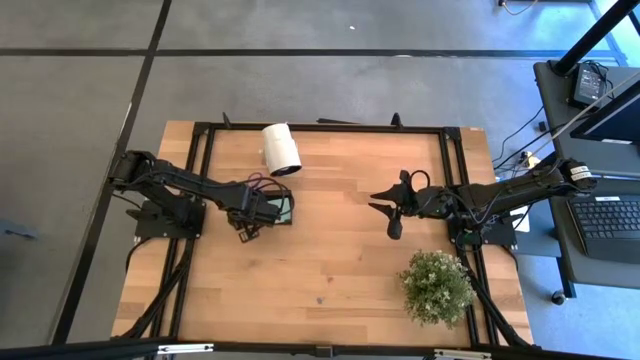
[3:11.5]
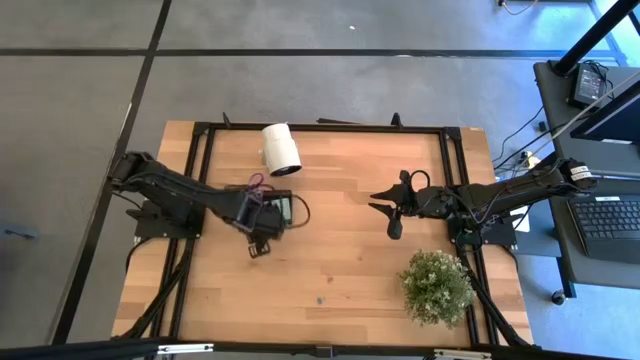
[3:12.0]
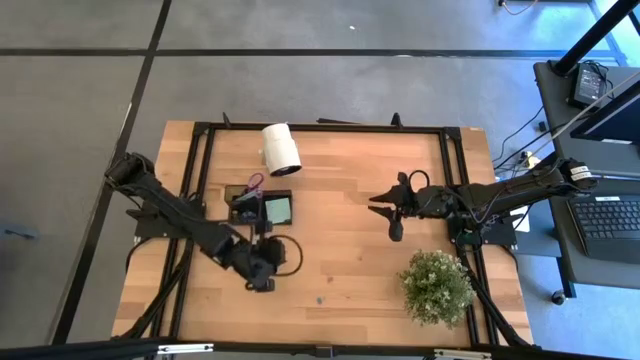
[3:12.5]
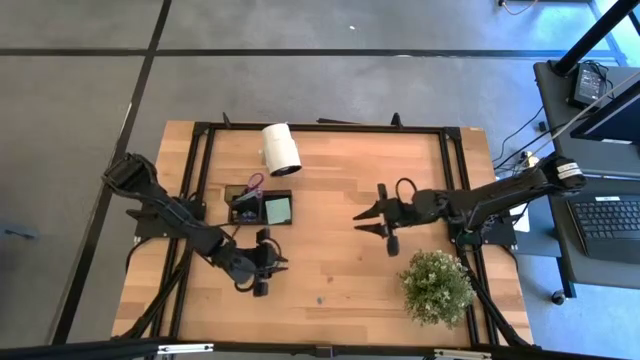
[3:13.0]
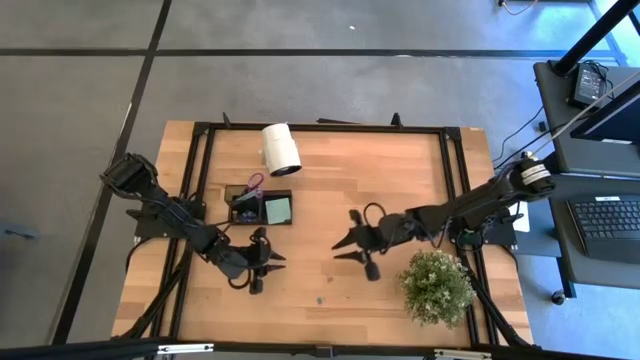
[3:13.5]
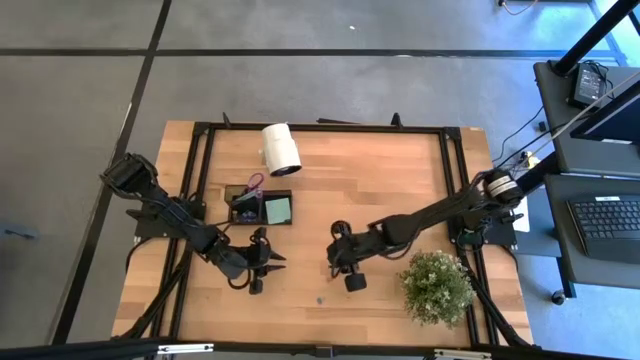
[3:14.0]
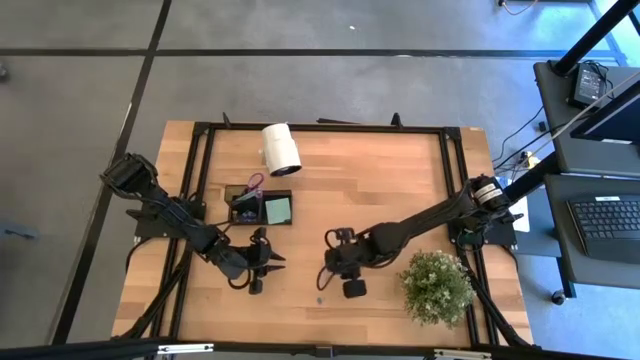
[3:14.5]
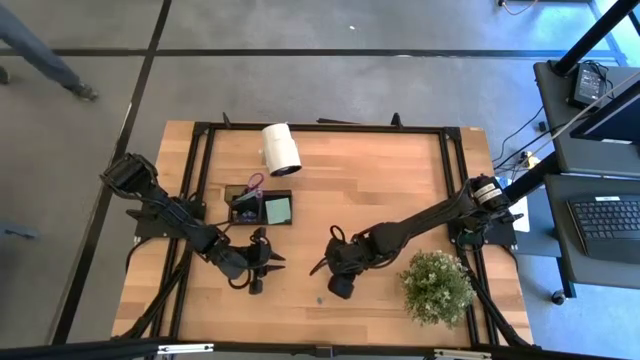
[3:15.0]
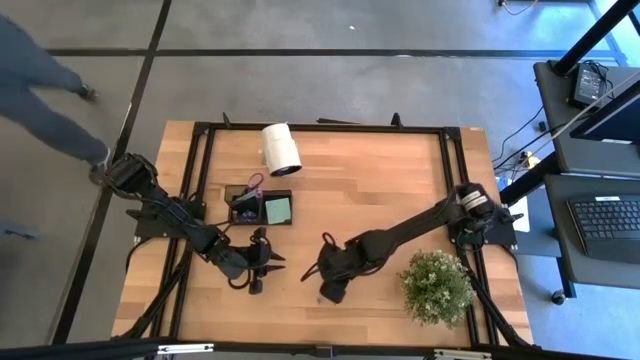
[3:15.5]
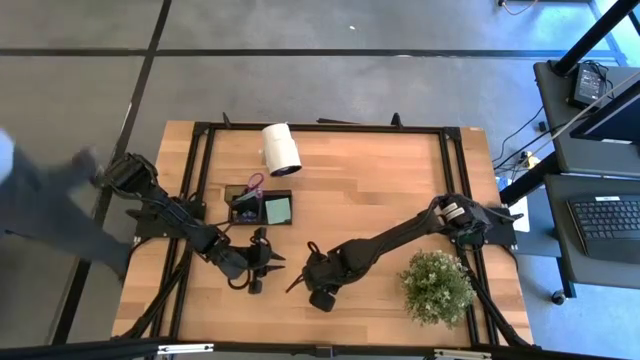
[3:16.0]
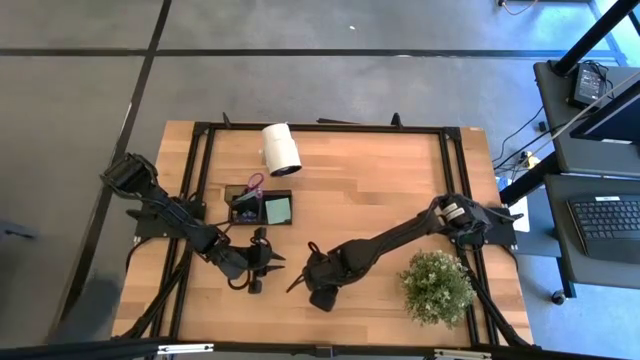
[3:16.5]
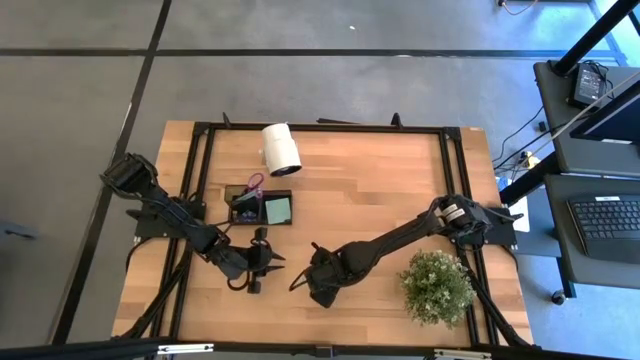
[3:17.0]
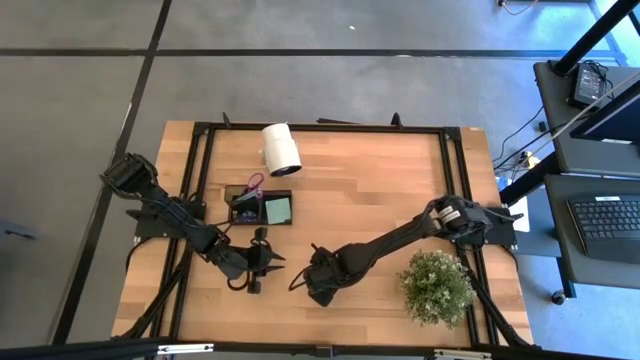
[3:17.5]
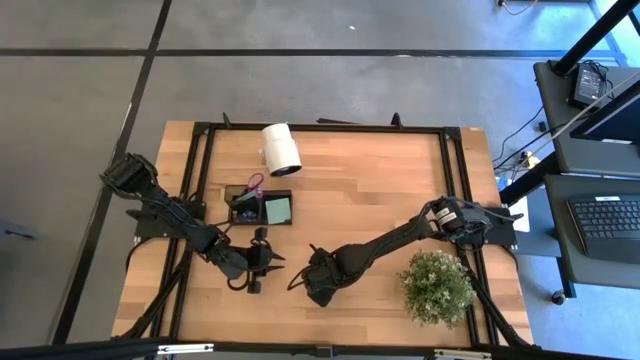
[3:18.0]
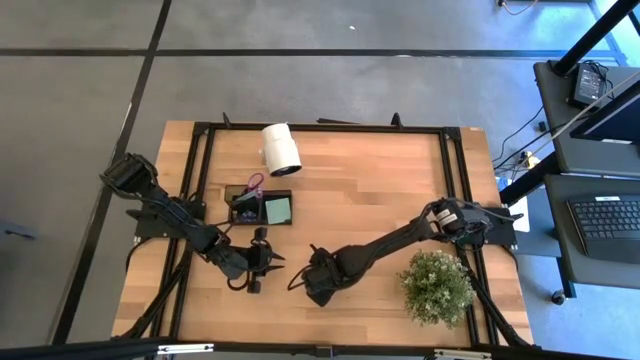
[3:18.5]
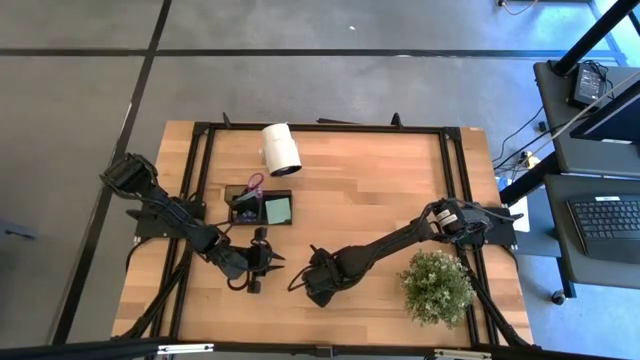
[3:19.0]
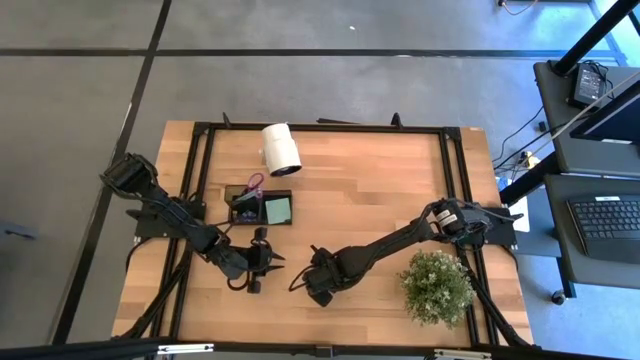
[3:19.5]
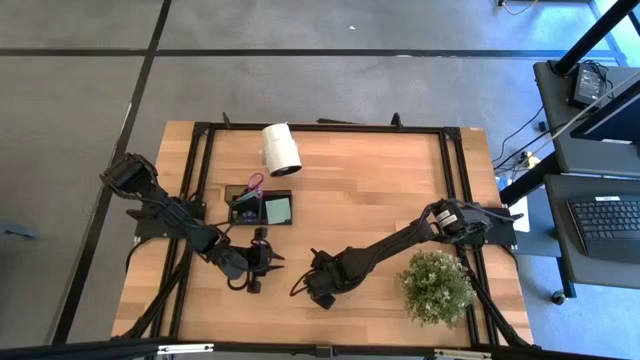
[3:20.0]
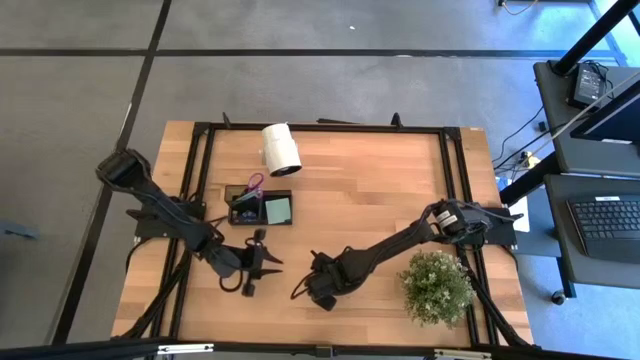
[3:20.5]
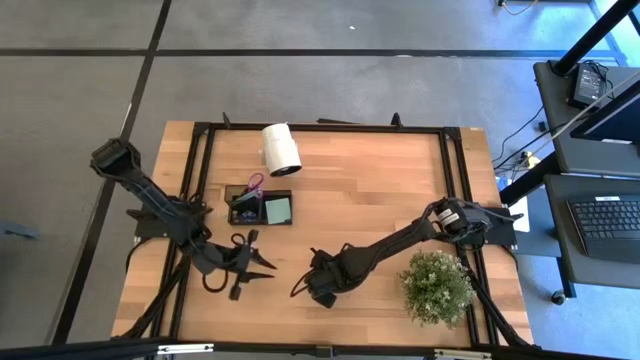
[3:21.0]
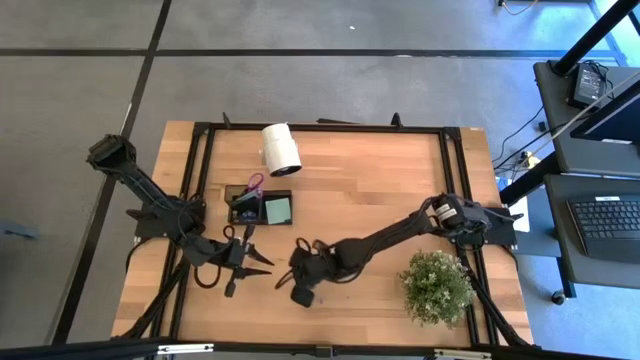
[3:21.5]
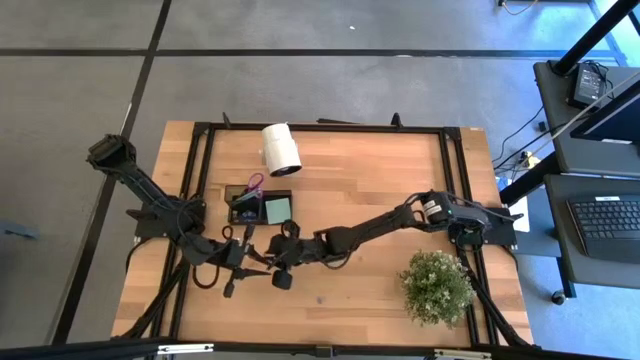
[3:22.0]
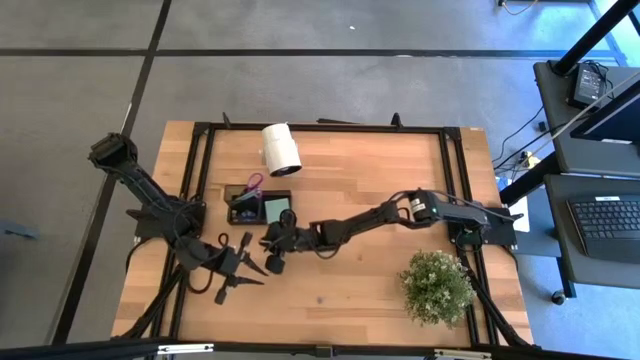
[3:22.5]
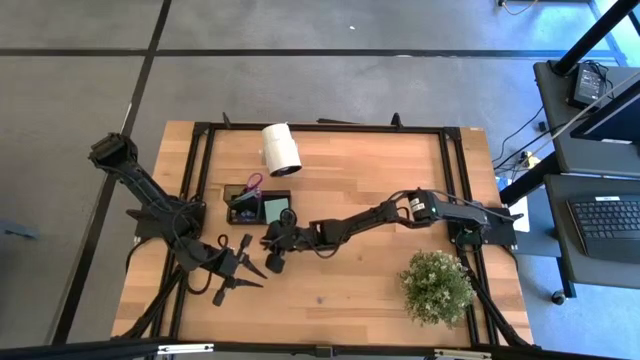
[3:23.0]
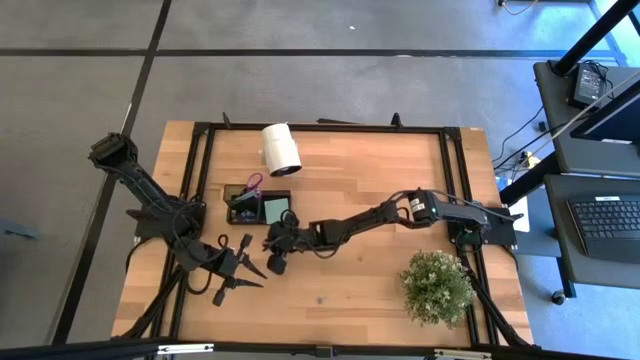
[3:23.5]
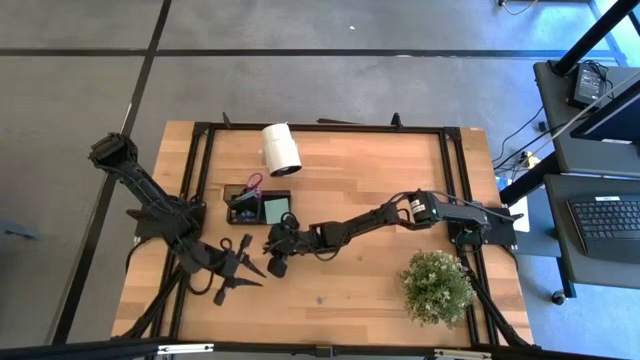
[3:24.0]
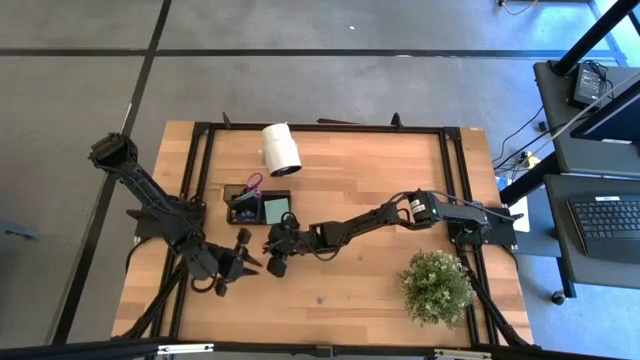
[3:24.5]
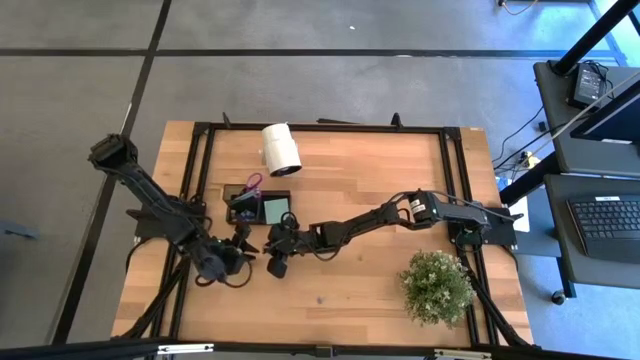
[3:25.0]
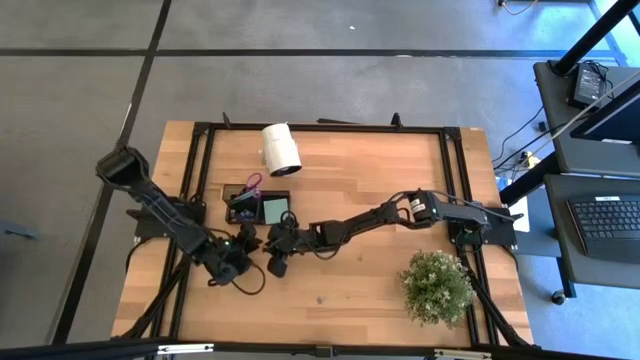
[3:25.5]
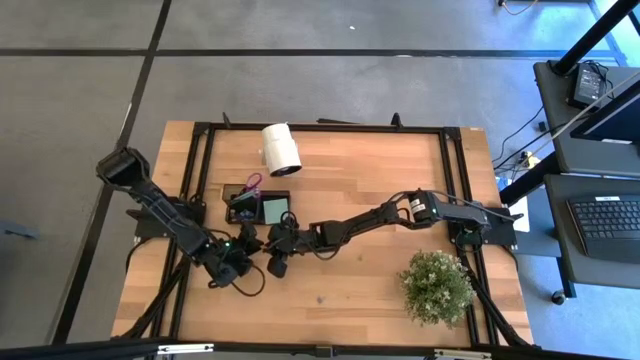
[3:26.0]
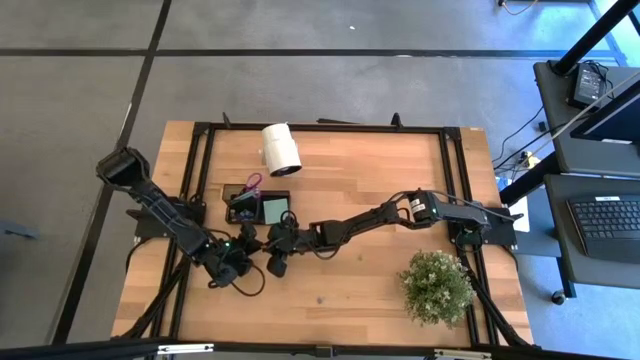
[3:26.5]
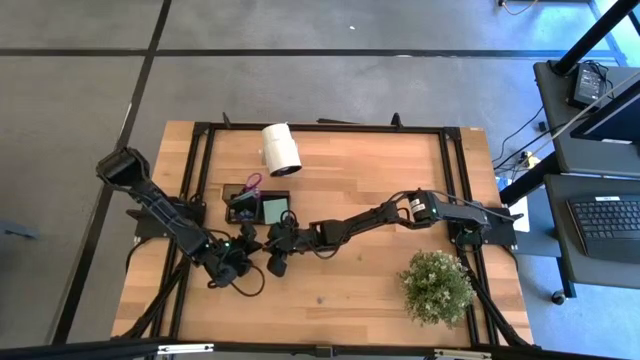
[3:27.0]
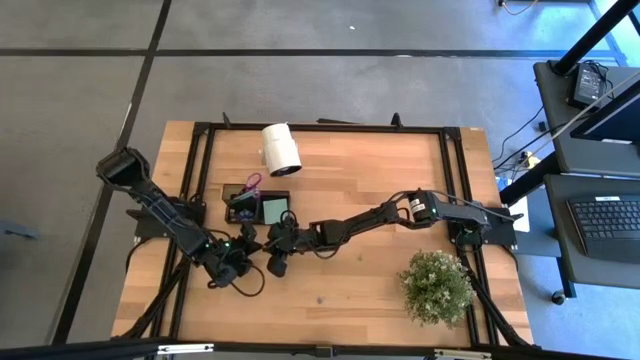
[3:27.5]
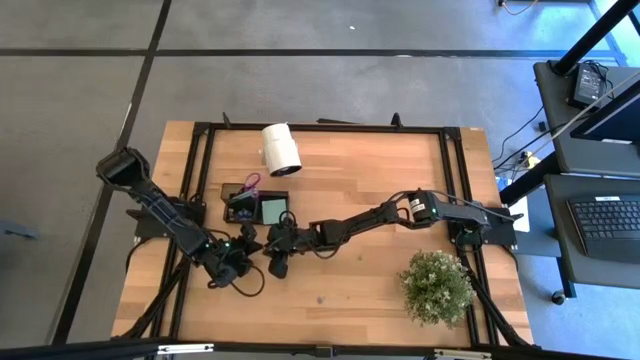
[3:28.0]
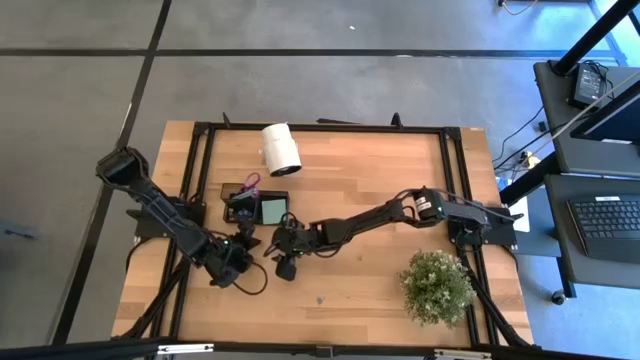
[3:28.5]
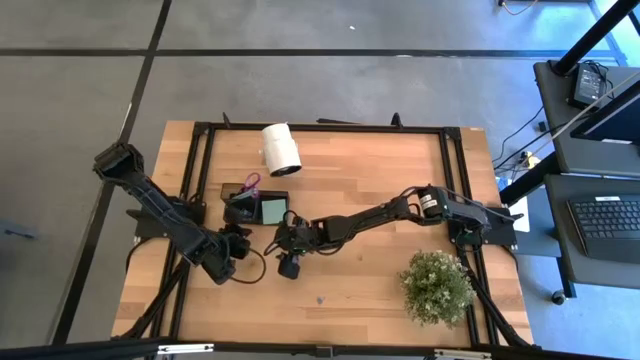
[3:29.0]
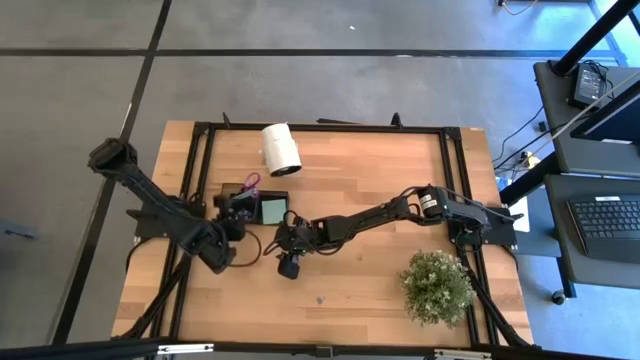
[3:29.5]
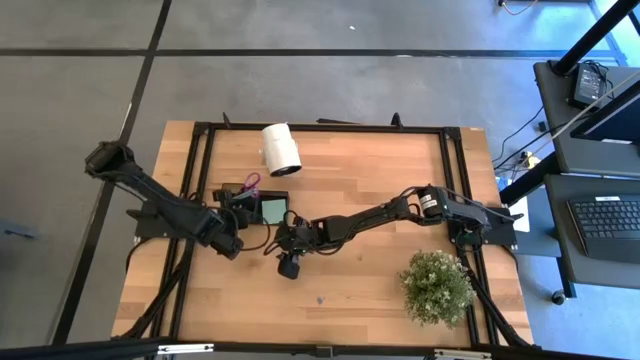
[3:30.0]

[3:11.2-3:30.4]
Task: Pick and place office supplies into organizer
Put the pink binder clip into the black desk organizer

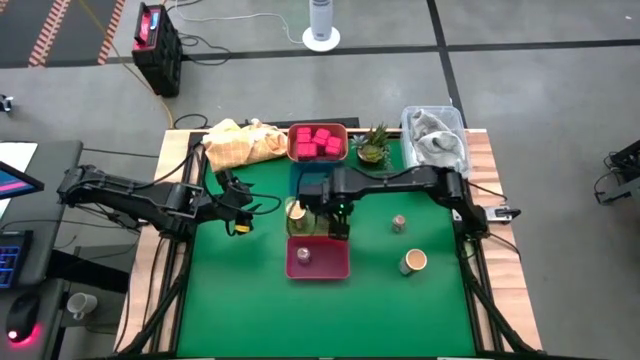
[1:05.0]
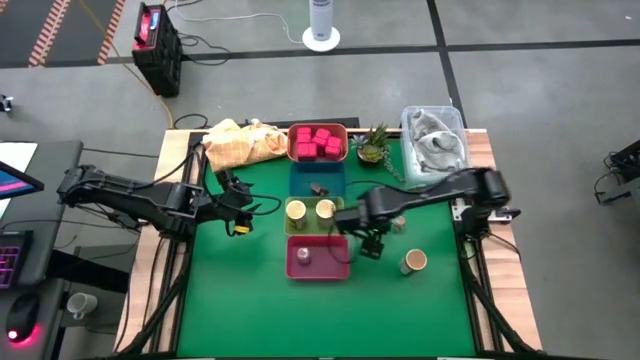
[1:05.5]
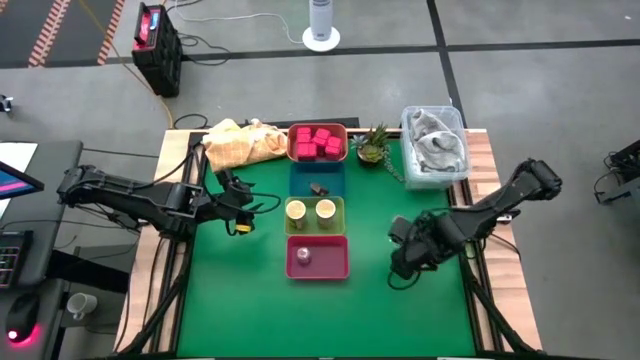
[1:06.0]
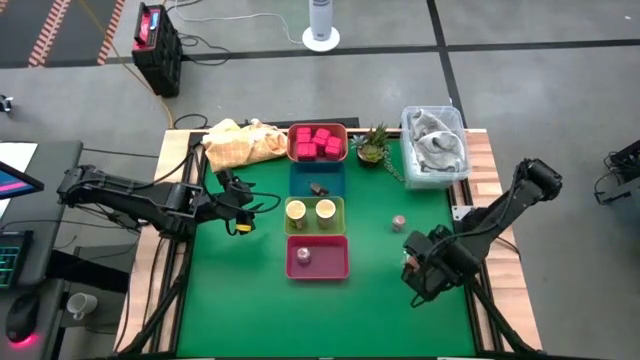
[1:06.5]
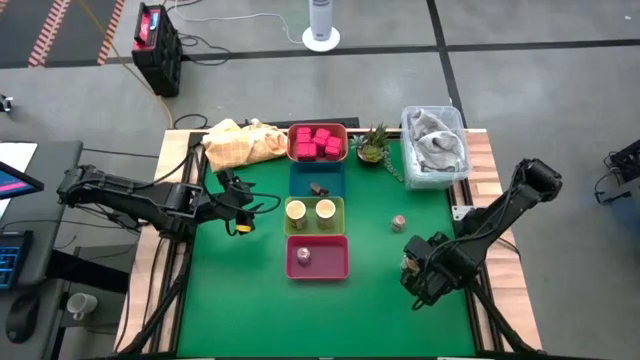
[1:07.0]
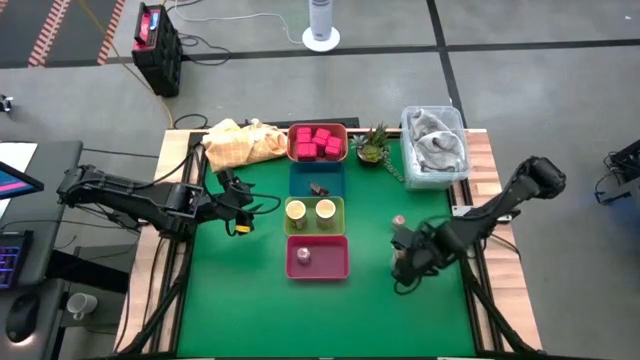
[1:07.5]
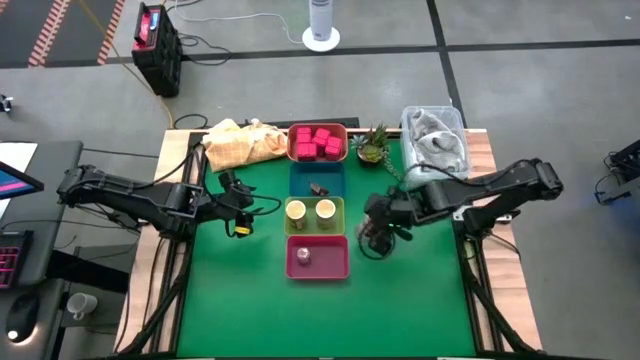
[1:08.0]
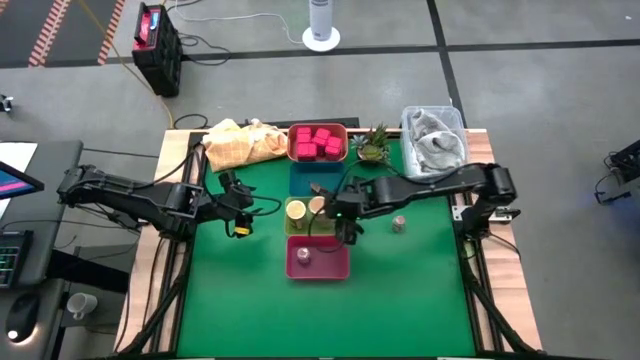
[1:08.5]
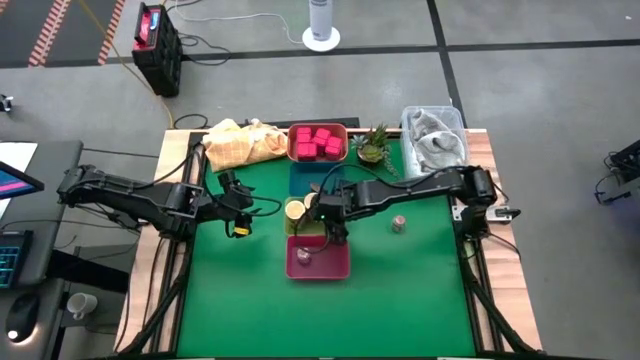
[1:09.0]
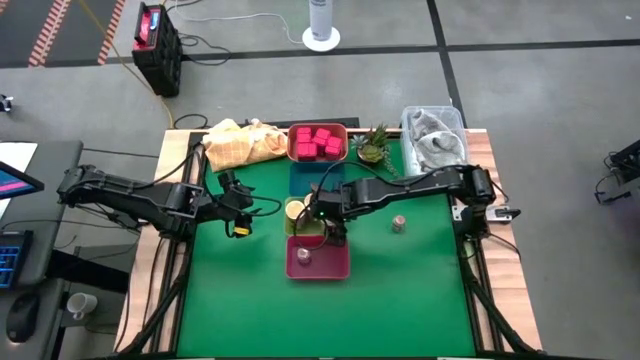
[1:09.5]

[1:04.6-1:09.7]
Task: Sort spices by type
Put the golden seasoning bottle into the yellow bin
